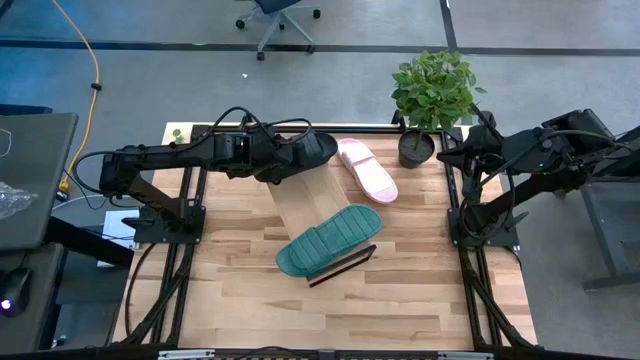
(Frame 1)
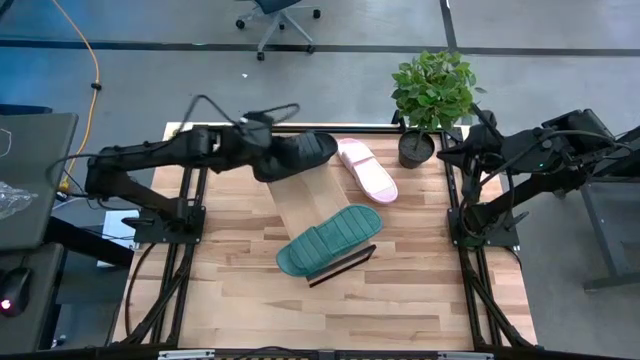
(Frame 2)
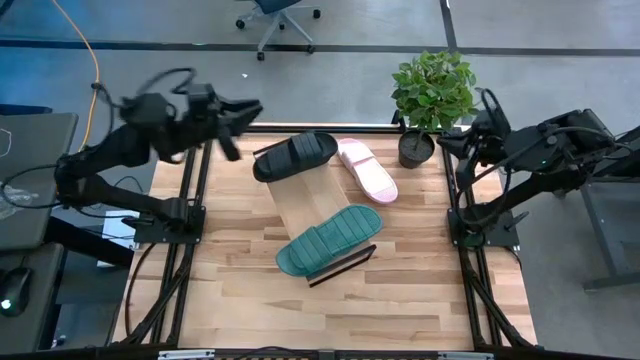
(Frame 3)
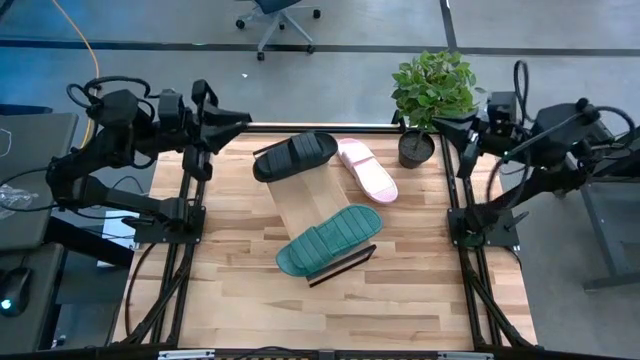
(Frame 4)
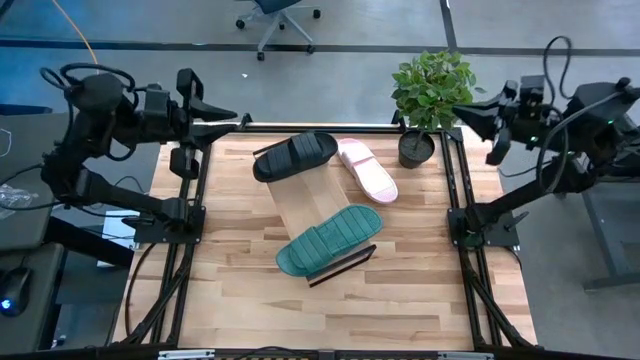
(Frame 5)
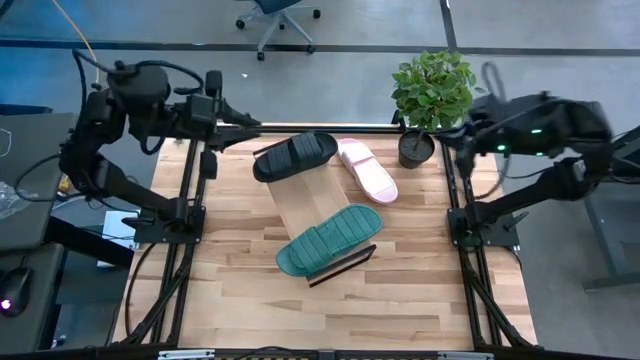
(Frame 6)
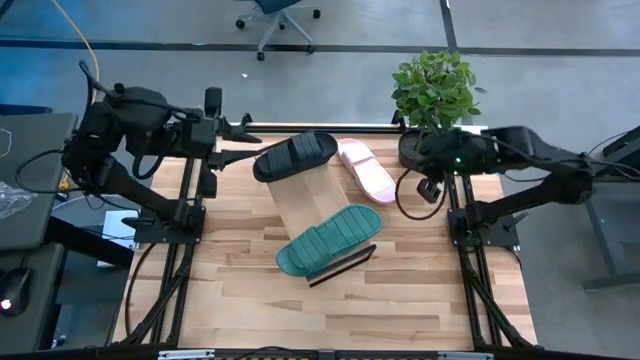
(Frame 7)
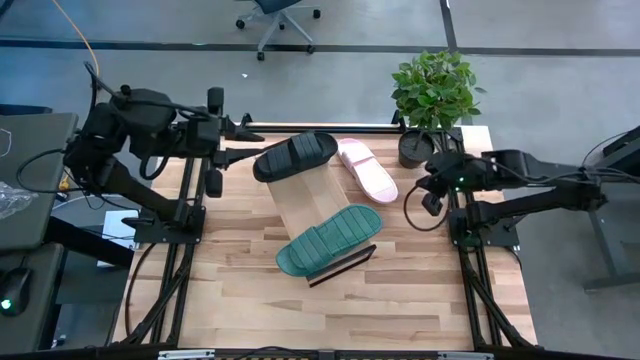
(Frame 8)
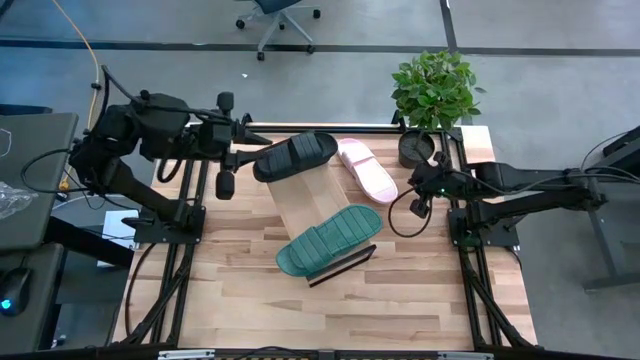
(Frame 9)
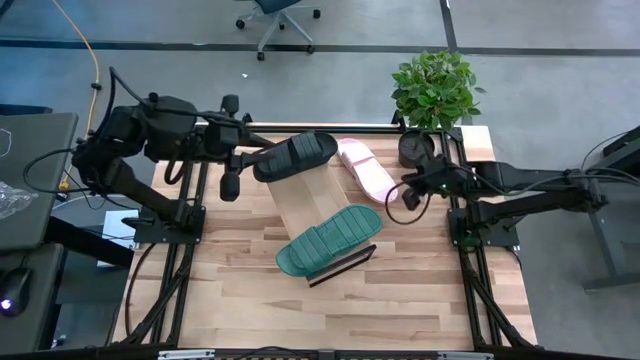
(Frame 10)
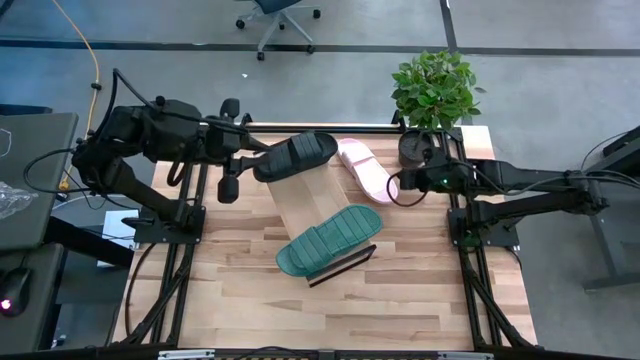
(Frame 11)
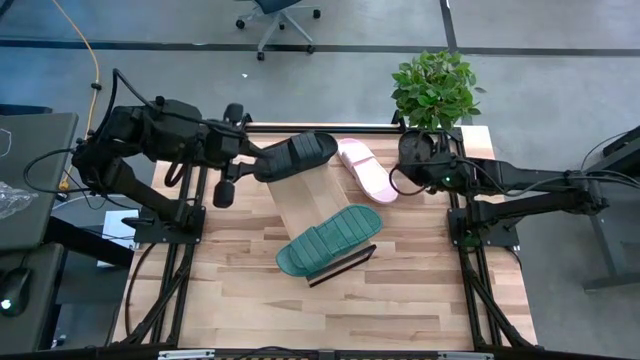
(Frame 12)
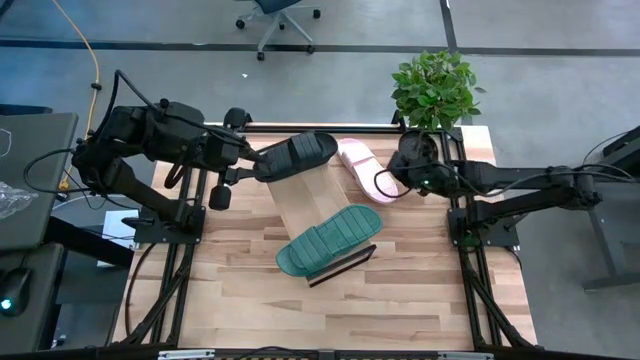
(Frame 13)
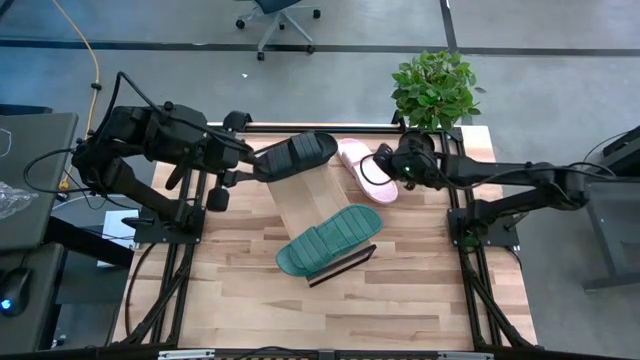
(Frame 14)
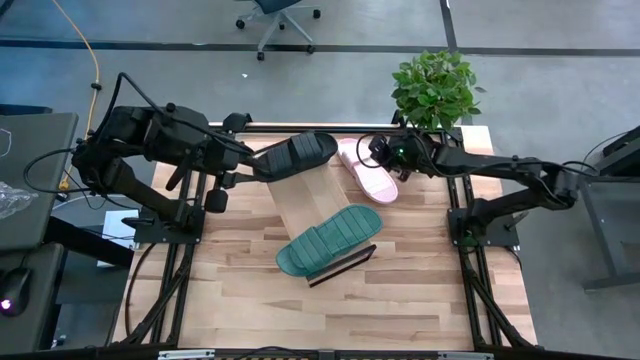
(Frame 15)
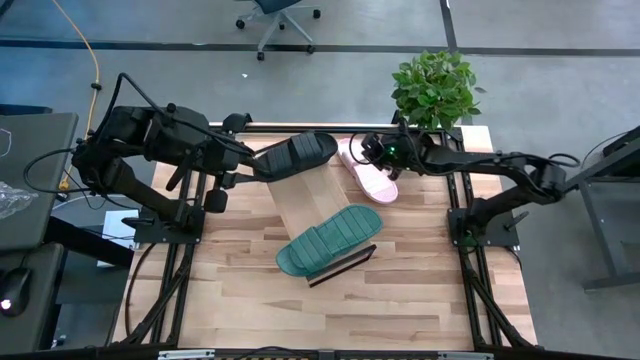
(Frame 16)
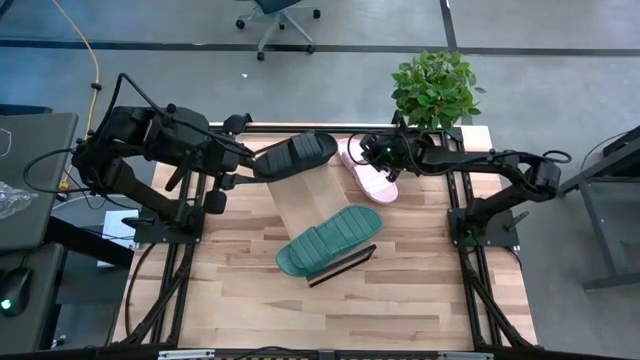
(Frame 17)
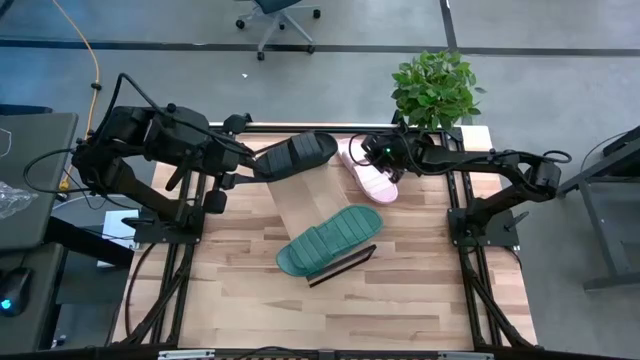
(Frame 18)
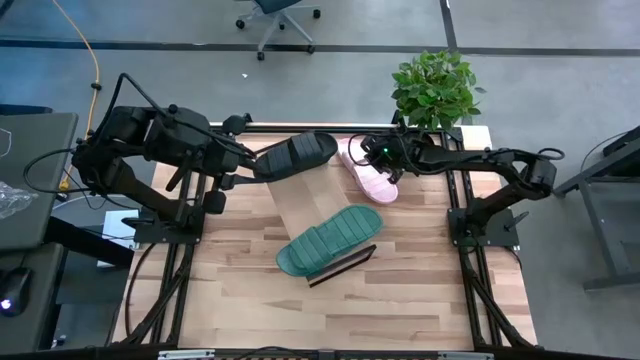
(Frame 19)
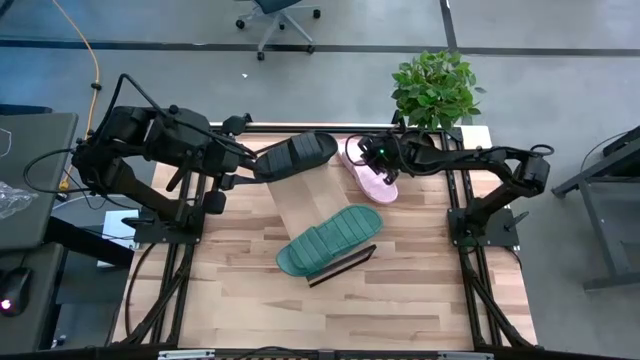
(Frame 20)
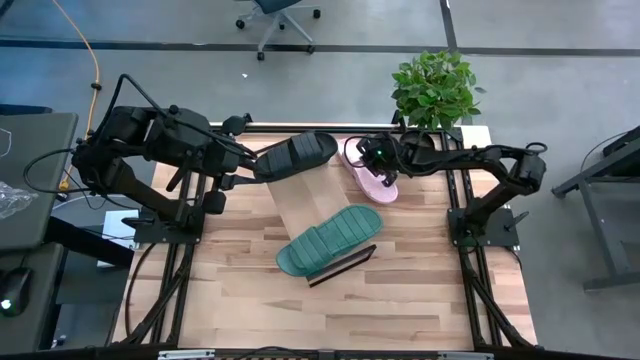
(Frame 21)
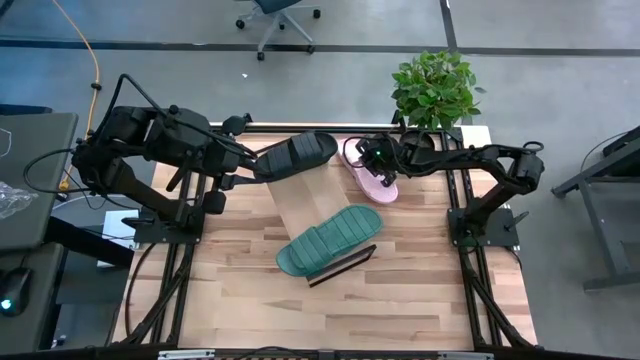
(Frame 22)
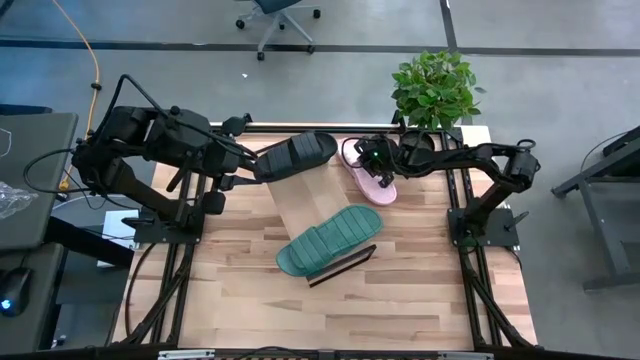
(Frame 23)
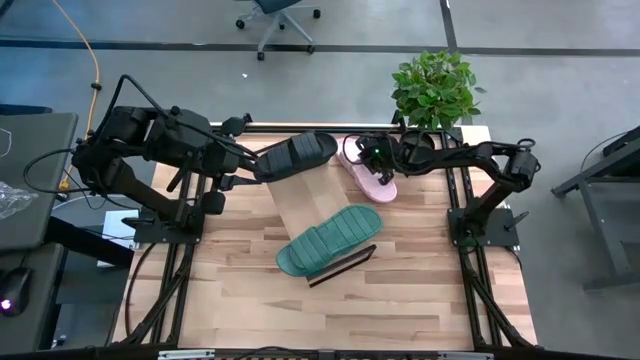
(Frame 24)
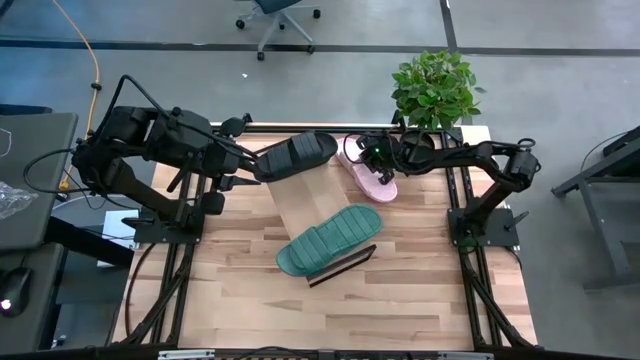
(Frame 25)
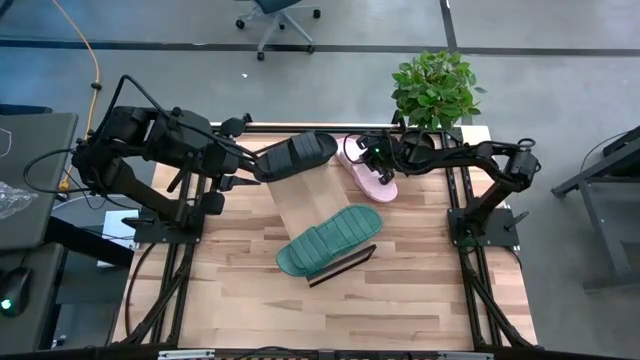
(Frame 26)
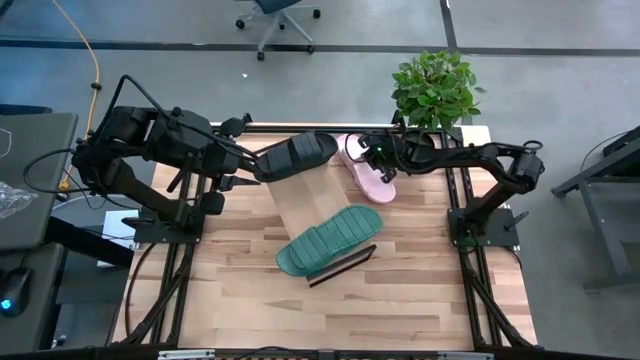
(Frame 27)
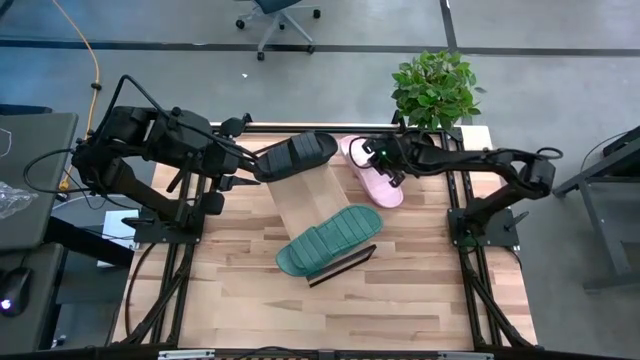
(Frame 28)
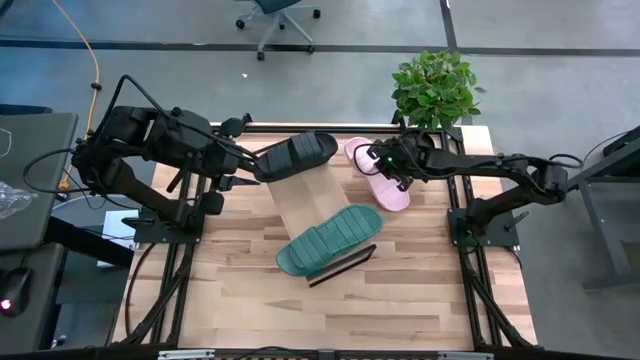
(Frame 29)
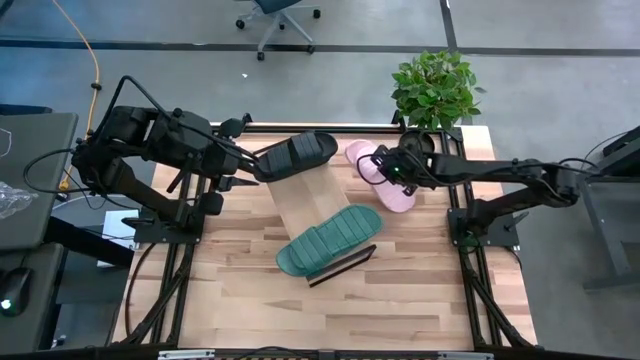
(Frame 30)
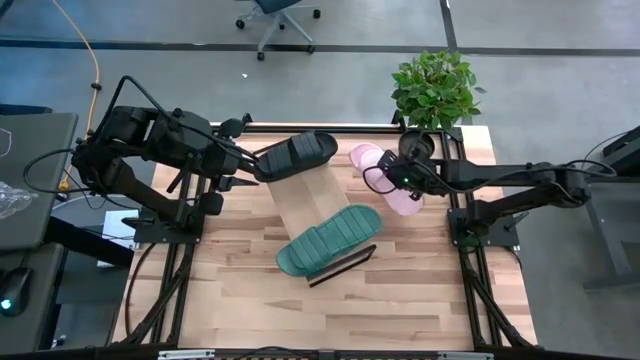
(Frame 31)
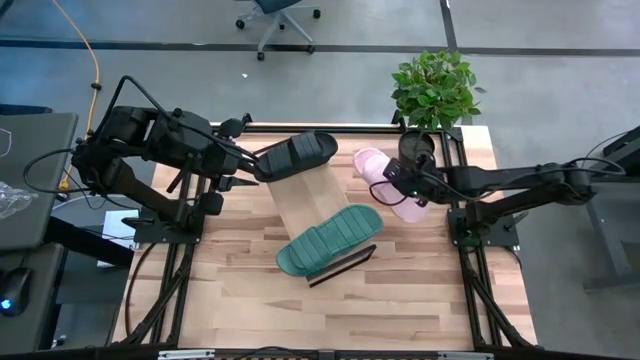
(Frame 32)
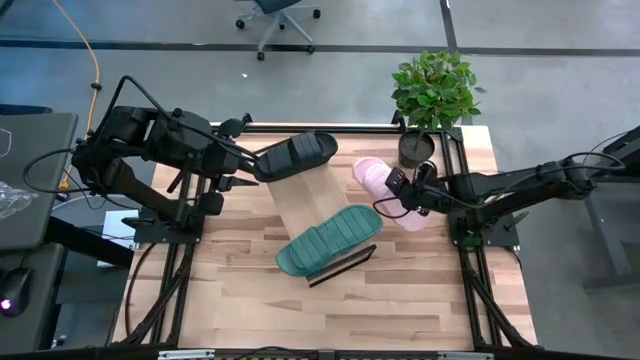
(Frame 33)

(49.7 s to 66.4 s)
Task: Pick and place slides into the shelf
Put the pink pair of slides on the shelf

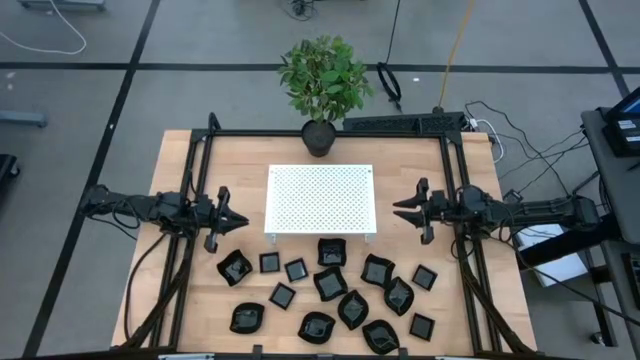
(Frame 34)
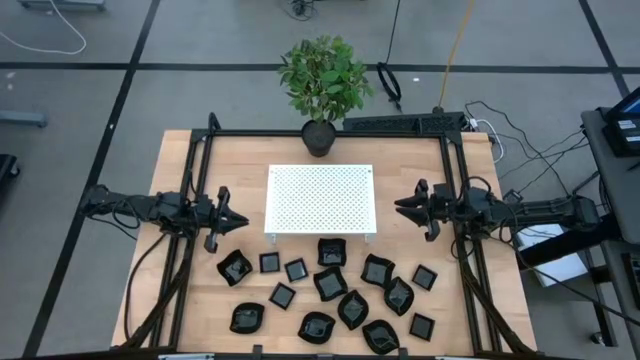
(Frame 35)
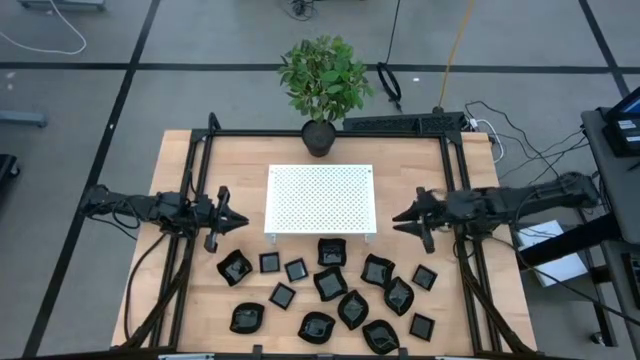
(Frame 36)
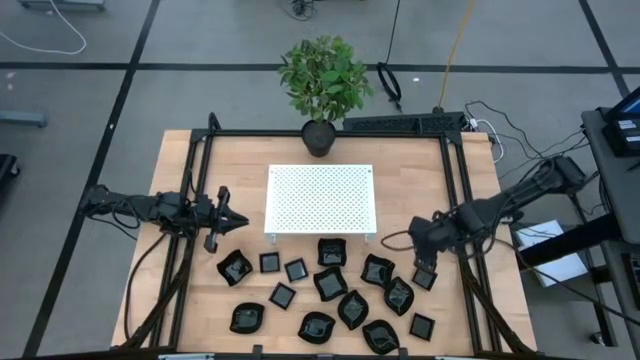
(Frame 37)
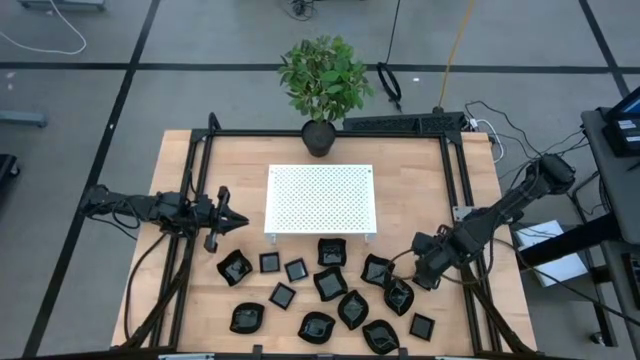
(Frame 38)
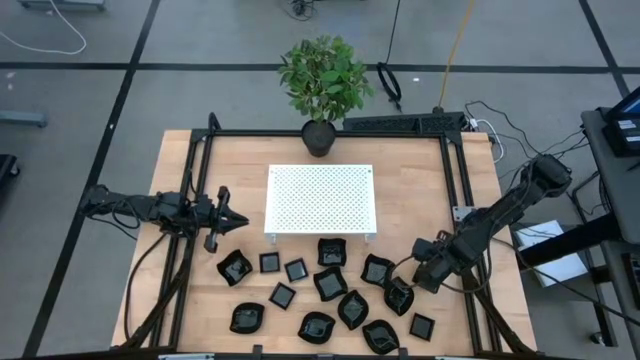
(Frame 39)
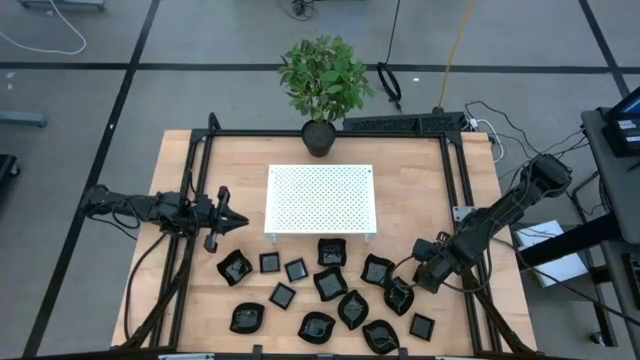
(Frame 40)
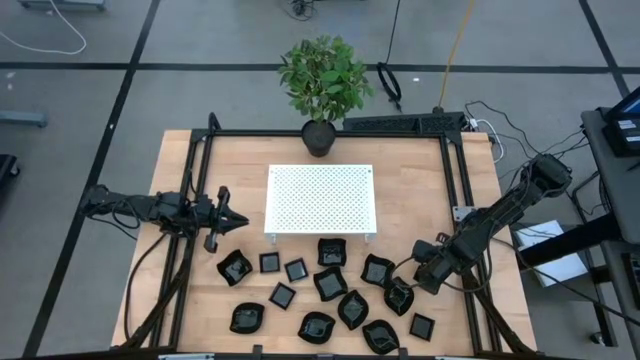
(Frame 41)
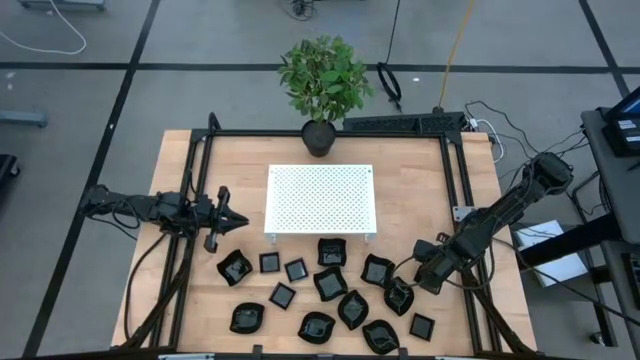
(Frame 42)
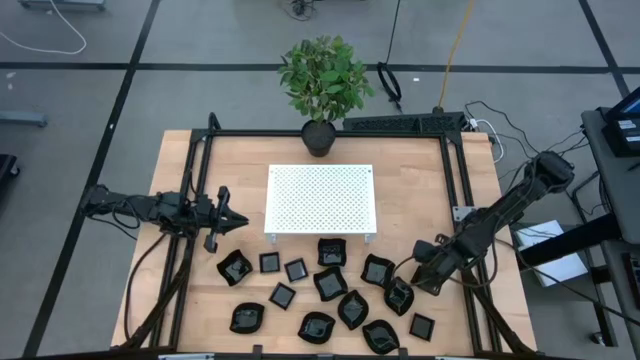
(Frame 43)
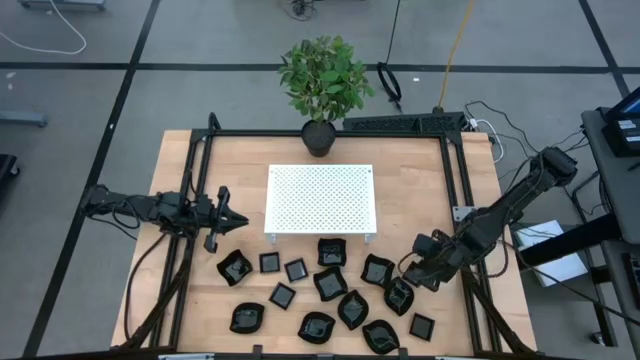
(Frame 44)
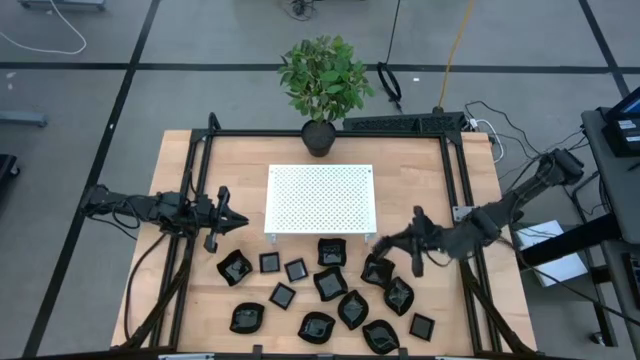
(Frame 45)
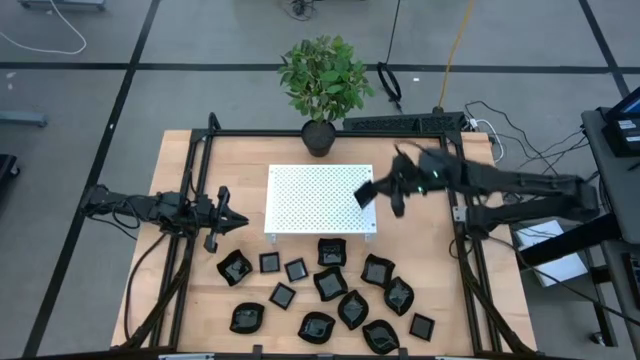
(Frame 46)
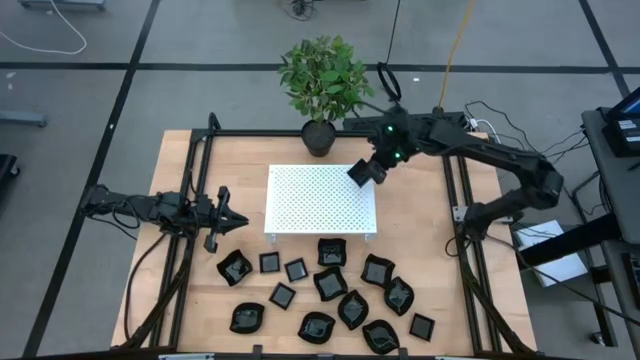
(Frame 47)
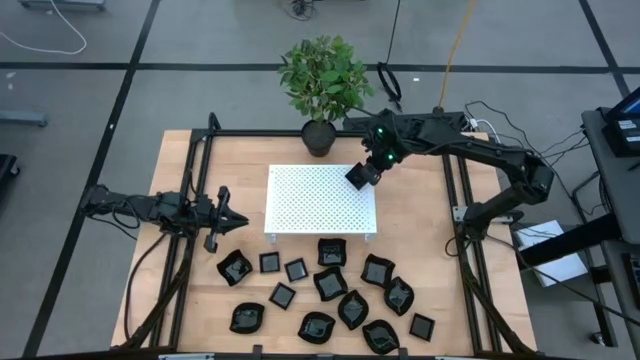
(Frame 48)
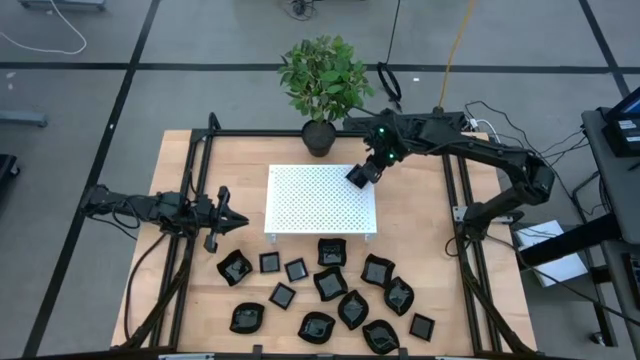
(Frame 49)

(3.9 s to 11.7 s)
Task: Pick & Place Mini shaped plates
Put the black square plate on the shelf
